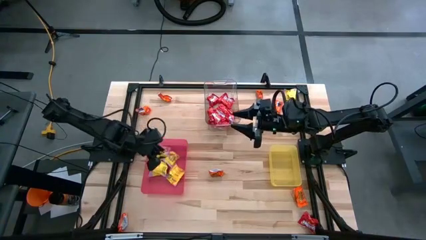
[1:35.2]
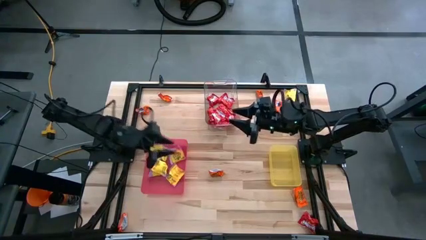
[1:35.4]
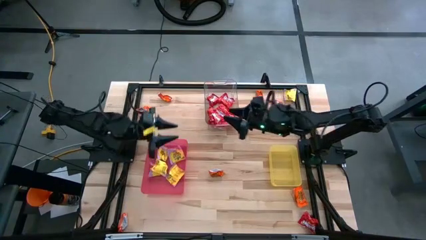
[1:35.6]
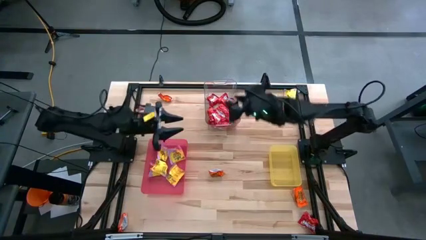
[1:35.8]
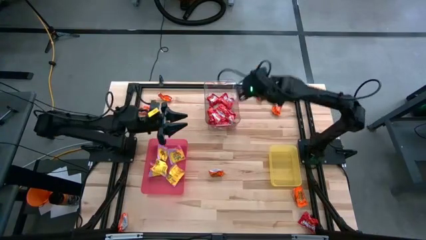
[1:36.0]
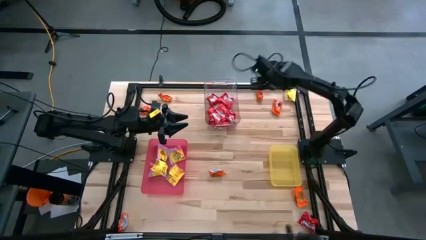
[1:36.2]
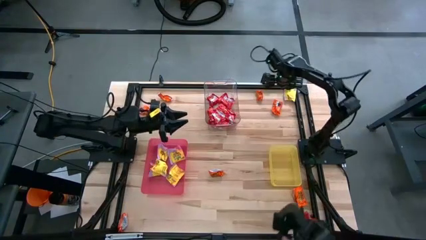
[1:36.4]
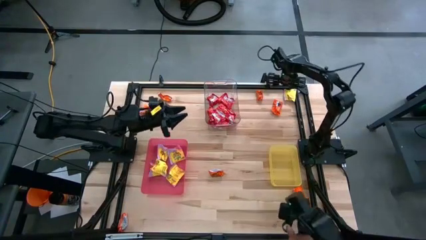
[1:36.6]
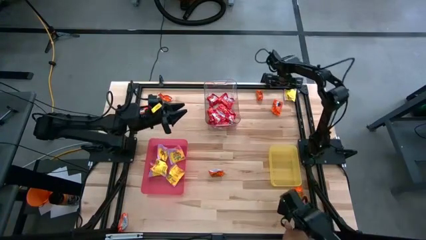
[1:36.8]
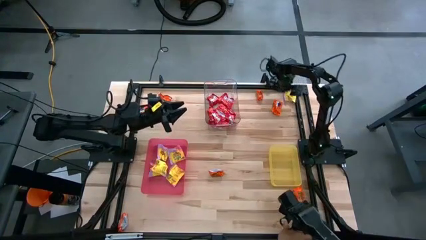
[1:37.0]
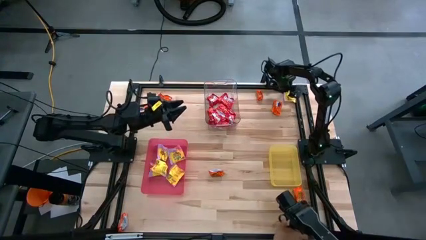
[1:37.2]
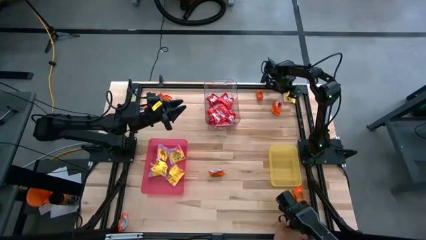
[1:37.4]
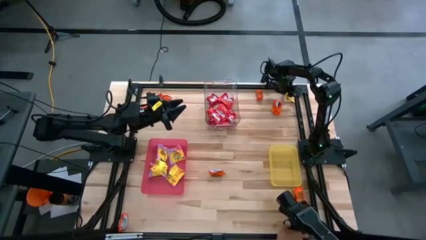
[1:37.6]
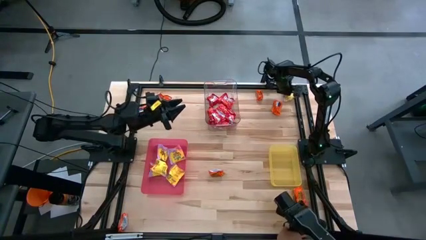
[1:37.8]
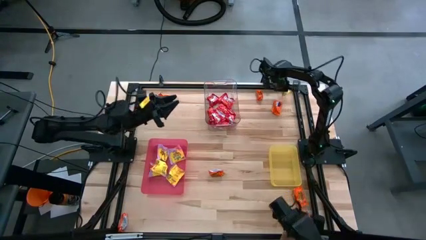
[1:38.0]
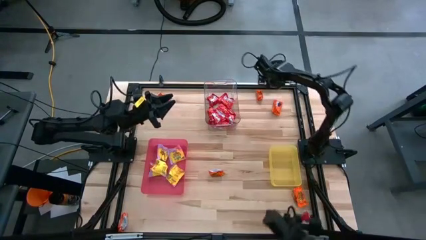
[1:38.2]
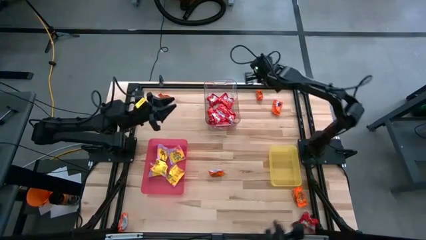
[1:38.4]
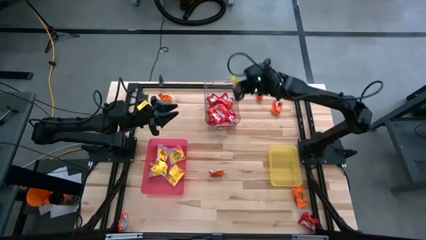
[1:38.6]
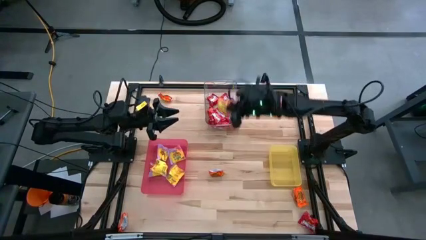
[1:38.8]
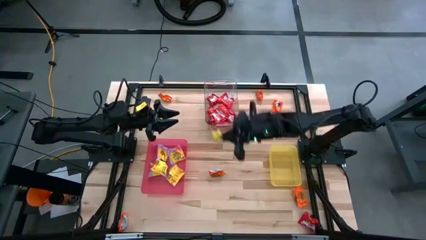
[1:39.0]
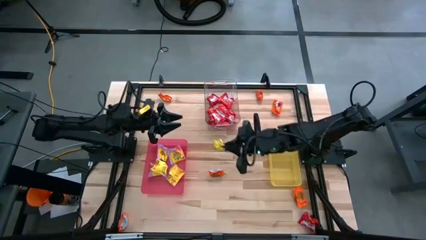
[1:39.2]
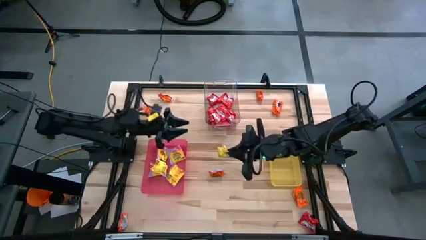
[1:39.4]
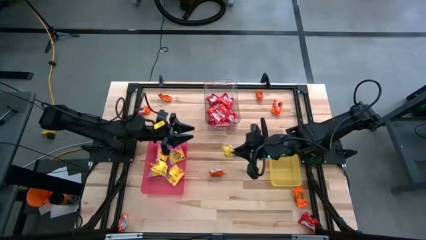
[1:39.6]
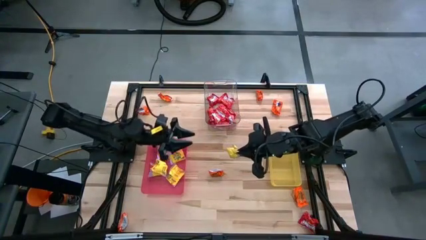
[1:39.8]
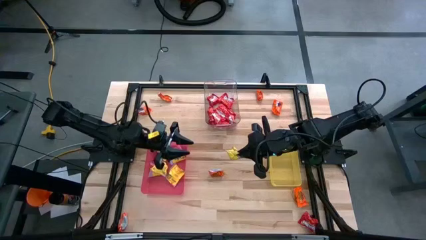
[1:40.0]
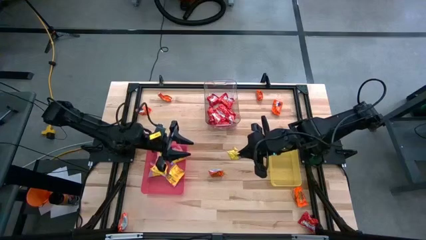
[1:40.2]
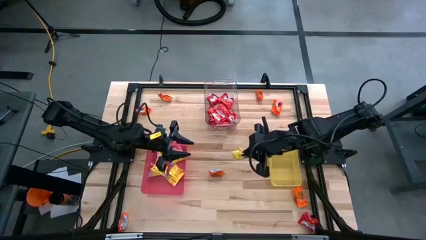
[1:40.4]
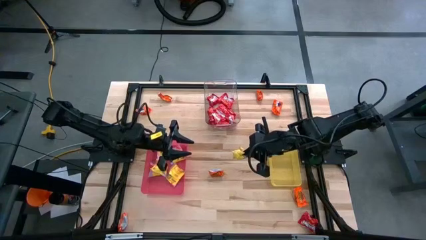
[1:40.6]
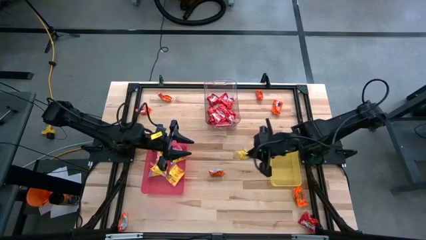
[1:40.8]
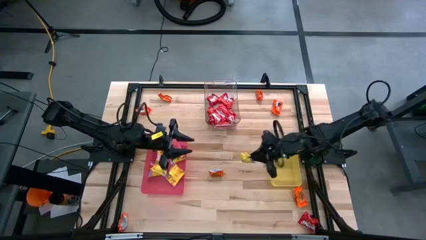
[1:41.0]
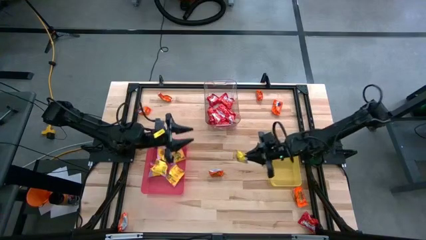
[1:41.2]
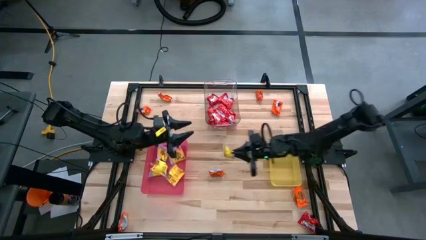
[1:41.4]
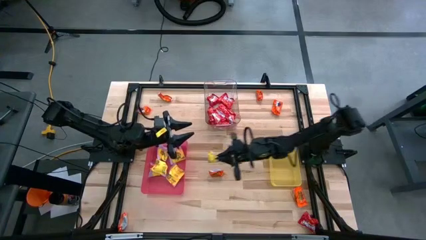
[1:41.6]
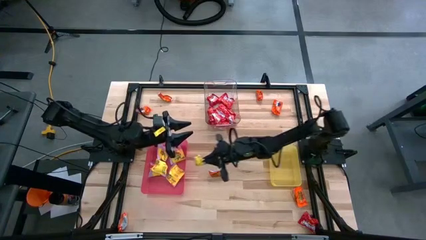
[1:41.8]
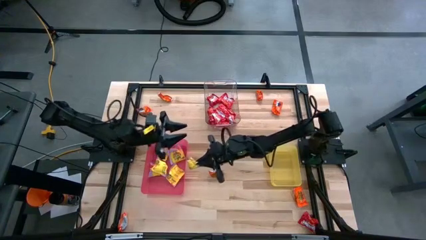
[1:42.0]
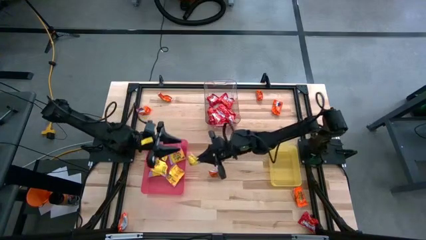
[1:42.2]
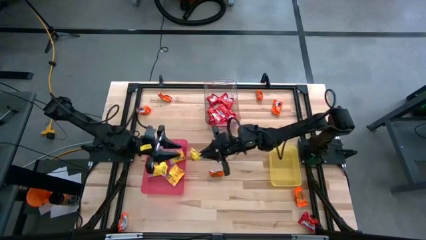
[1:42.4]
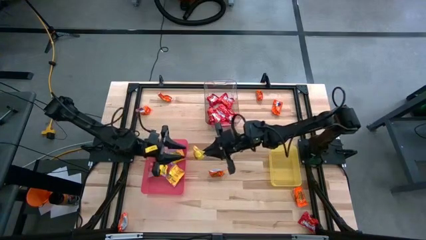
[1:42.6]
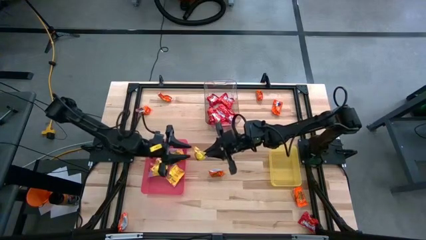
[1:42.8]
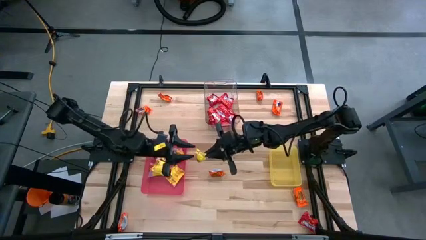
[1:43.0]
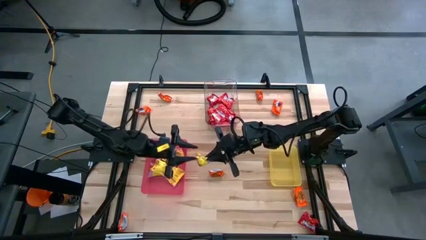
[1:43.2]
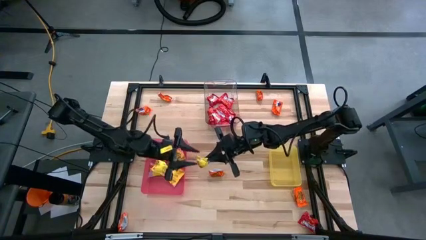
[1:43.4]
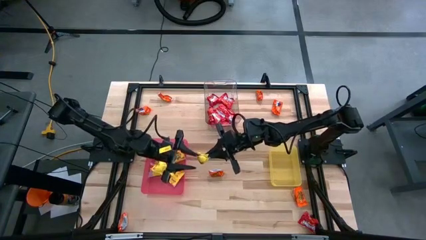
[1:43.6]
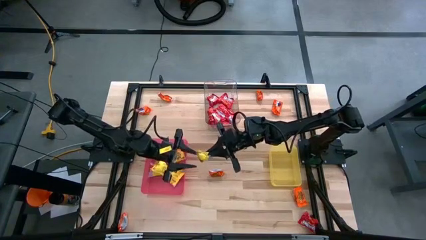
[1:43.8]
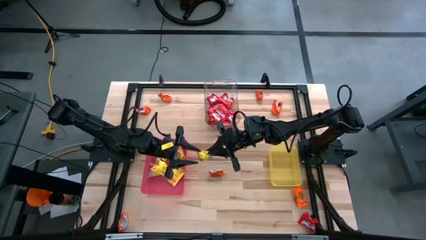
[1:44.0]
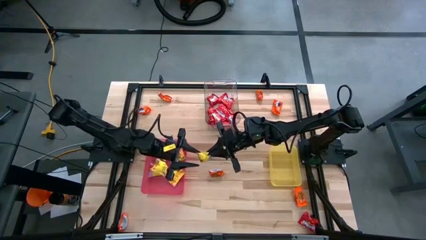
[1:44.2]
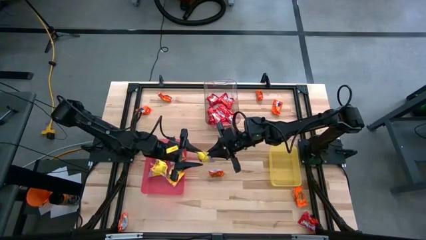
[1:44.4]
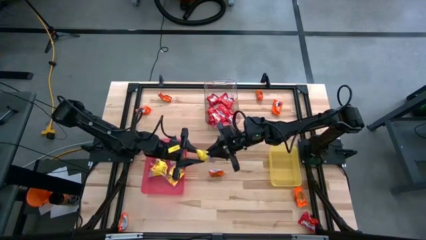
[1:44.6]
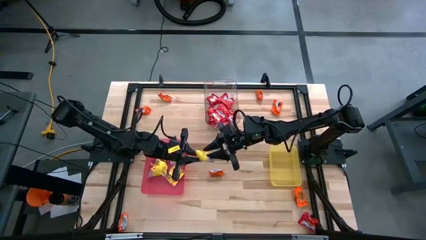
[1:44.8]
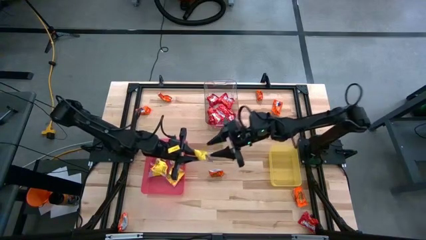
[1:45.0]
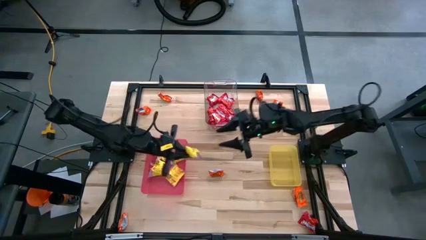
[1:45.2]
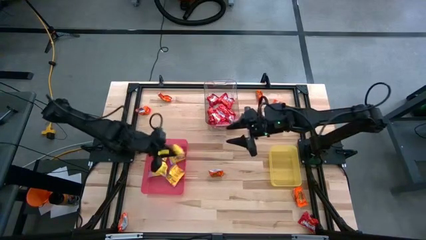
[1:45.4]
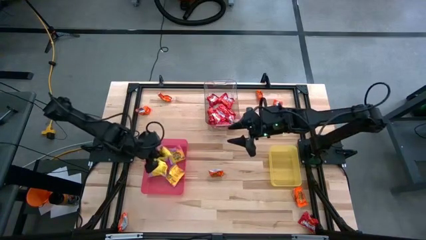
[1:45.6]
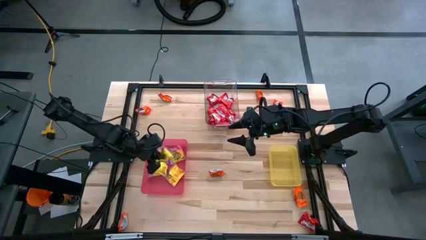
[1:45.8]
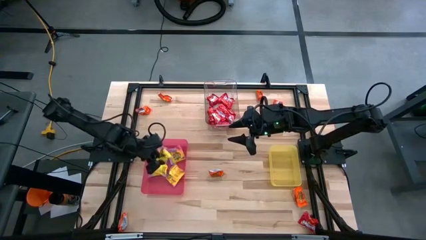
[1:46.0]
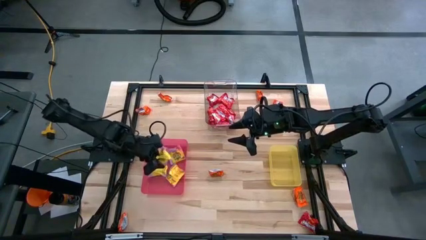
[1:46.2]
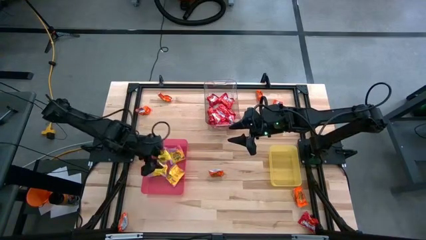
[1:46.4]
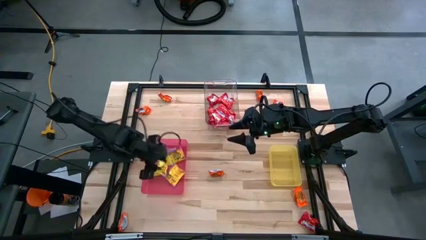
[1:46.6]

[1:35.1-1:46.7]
Task: Sort candy
Put the yellow candy into the pink bin

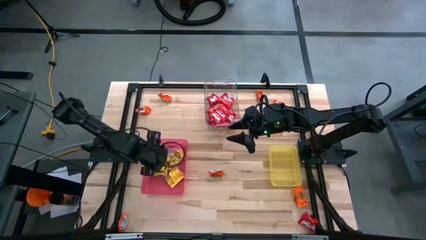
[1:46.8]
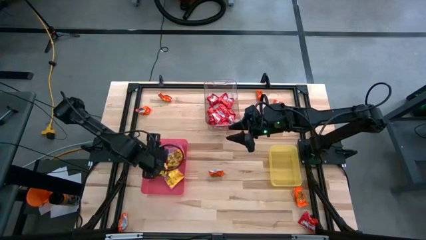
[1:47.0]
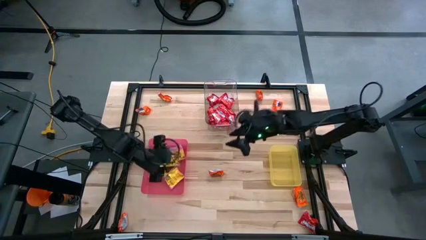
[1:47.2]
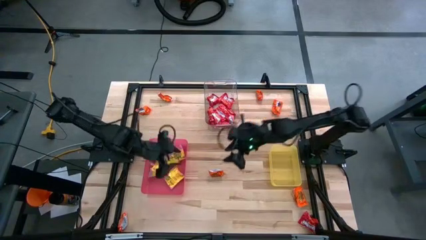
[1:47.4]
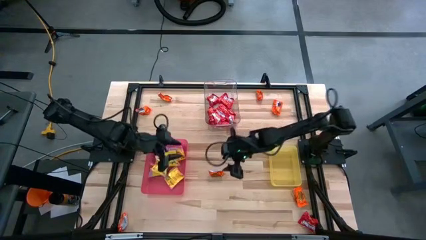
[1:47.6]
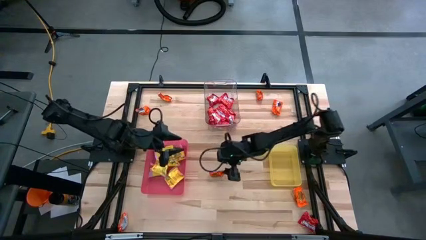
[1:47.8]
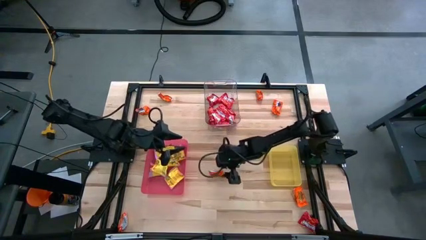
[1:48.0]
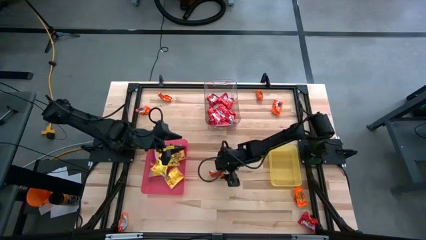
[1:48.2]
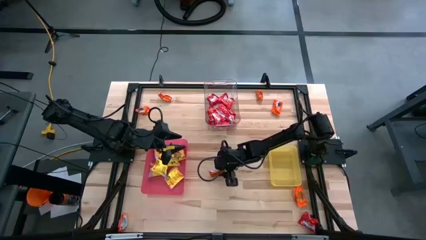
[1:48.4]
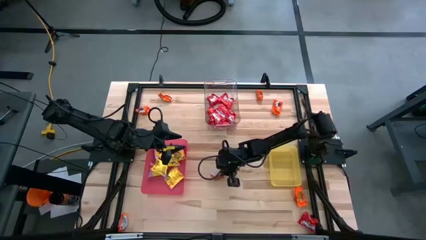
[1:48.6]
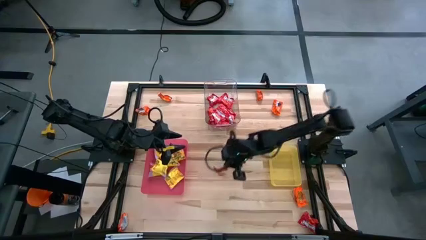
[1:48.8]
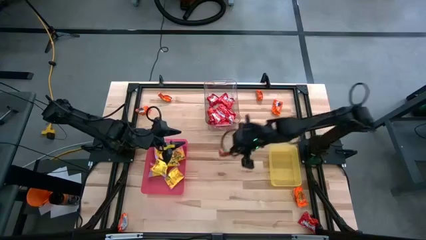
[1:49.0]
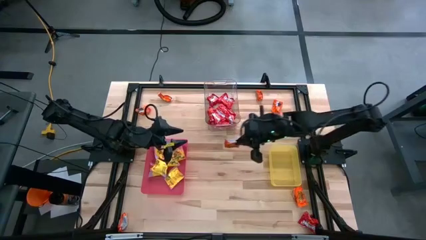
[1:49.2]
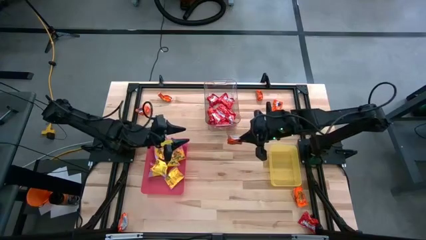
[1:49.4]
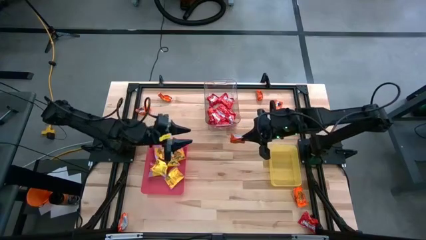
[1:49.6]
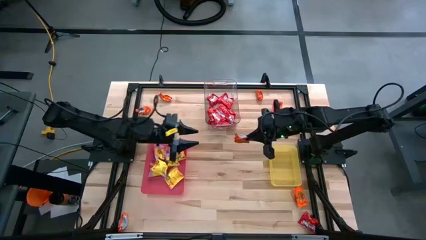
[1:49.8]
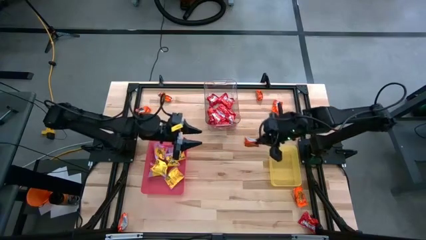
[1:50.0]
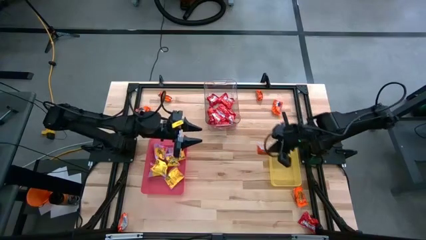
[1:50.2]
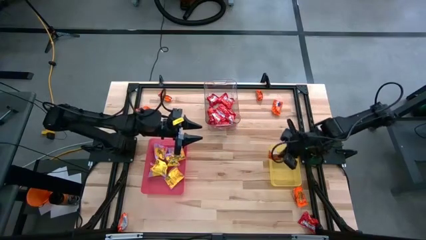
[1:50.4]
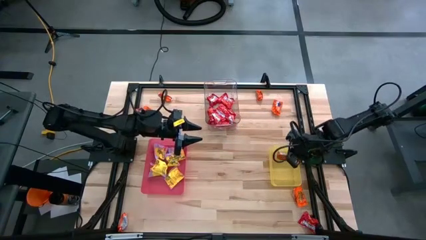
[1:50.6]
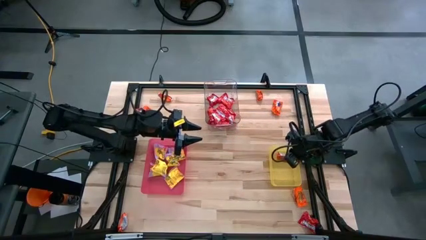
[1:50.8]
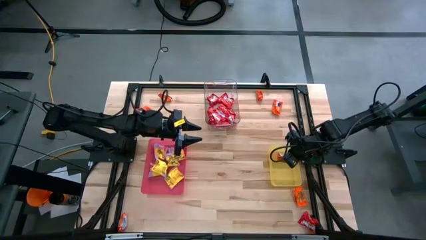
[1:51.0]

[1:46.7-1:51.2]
Put the orange candy into the yellow bin
